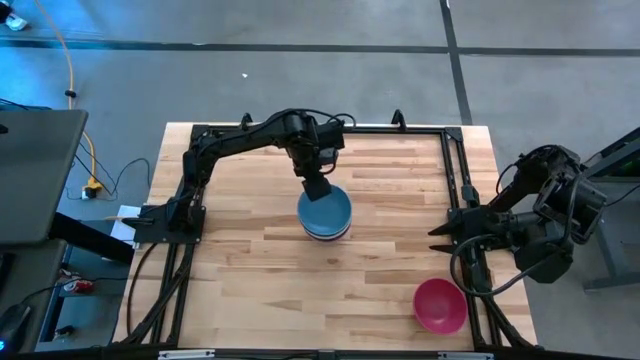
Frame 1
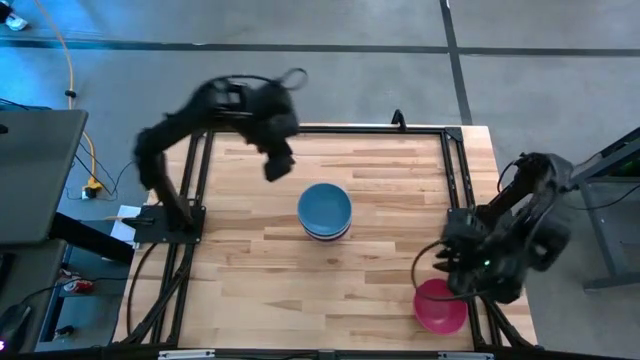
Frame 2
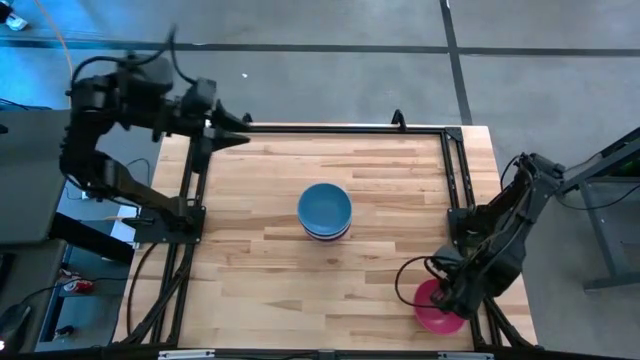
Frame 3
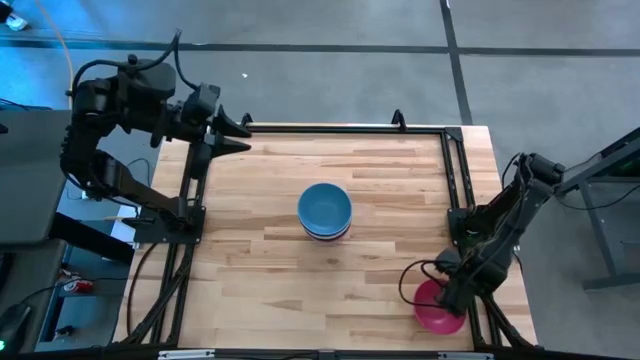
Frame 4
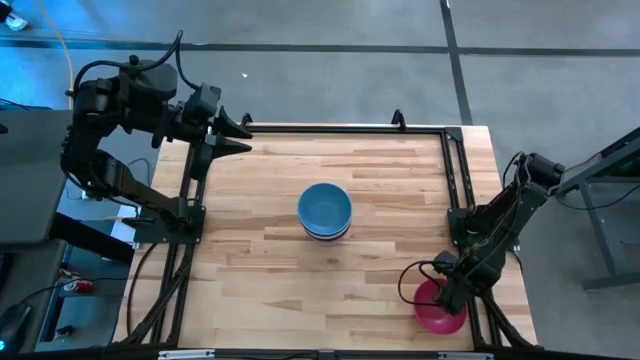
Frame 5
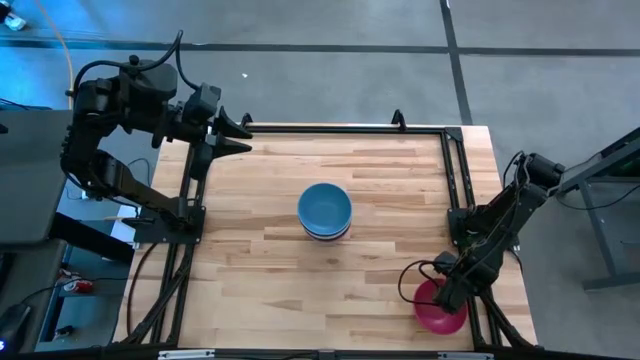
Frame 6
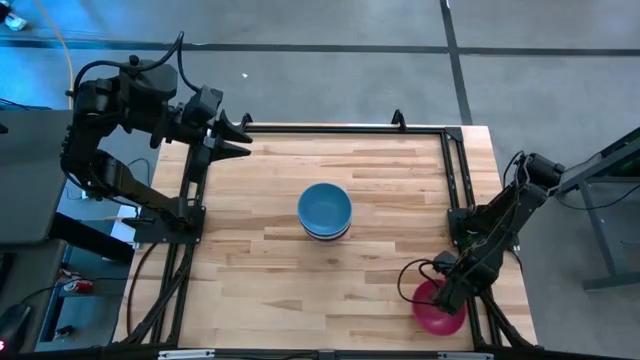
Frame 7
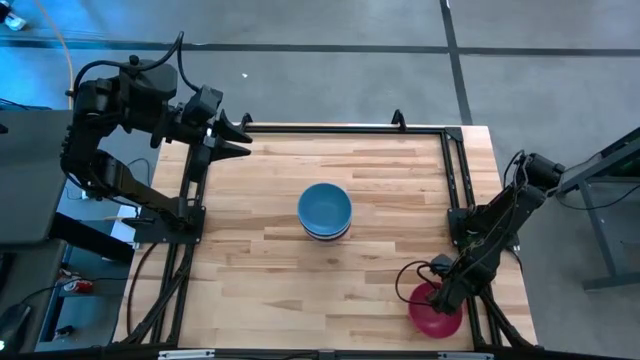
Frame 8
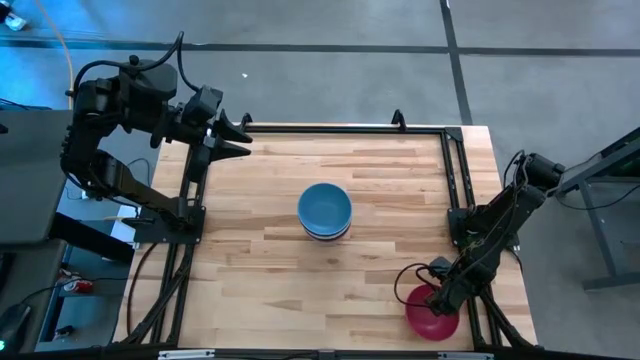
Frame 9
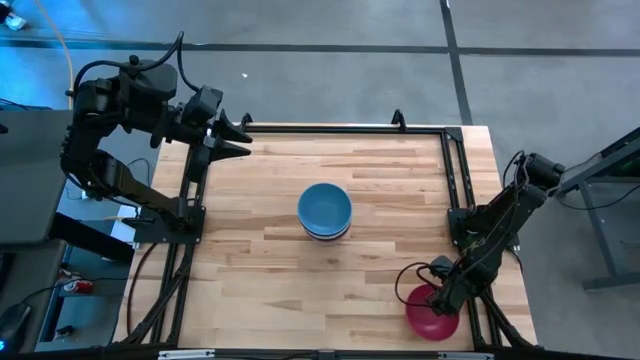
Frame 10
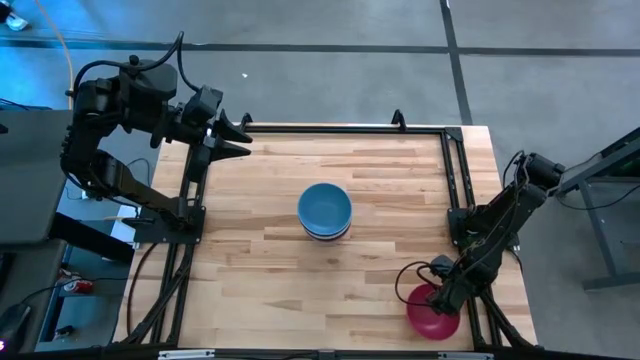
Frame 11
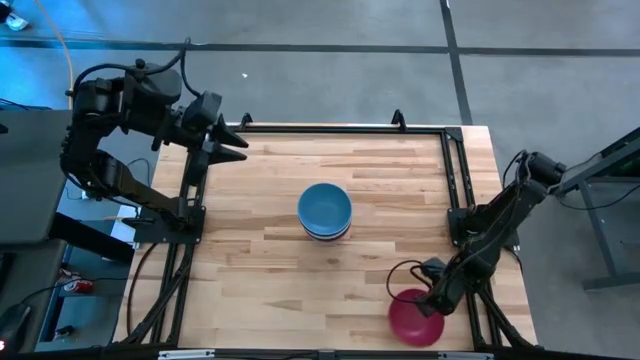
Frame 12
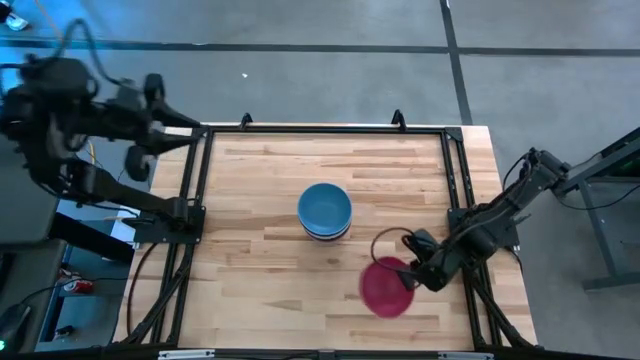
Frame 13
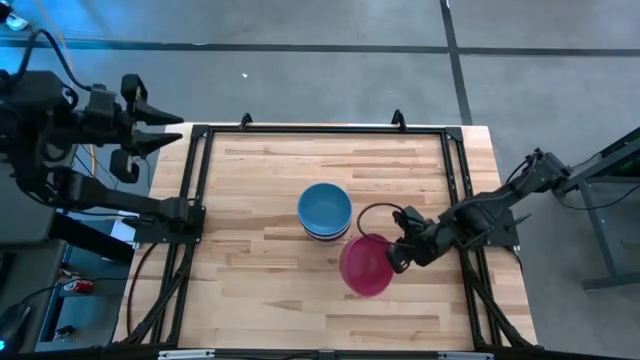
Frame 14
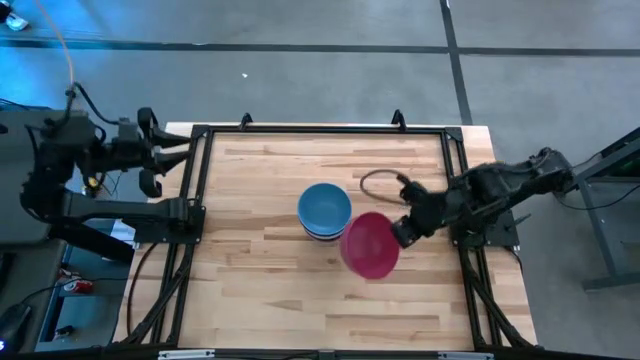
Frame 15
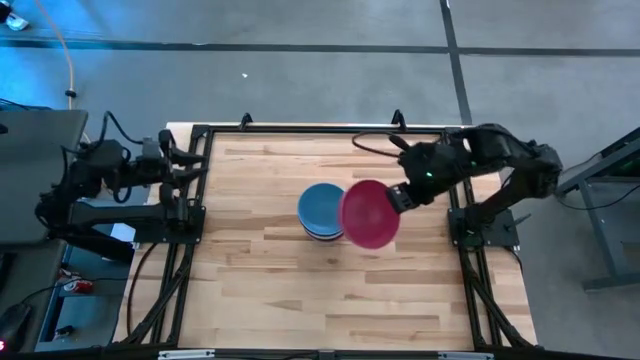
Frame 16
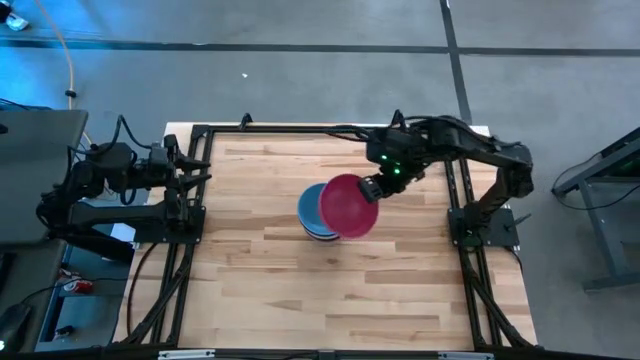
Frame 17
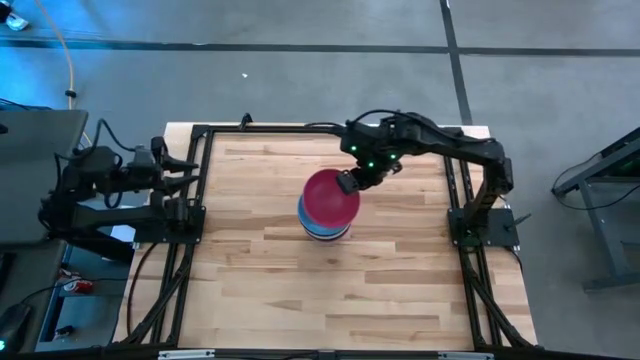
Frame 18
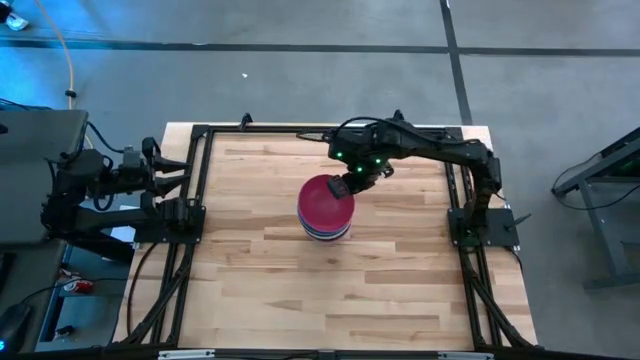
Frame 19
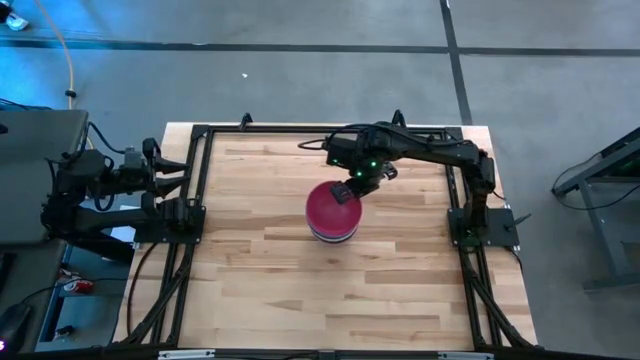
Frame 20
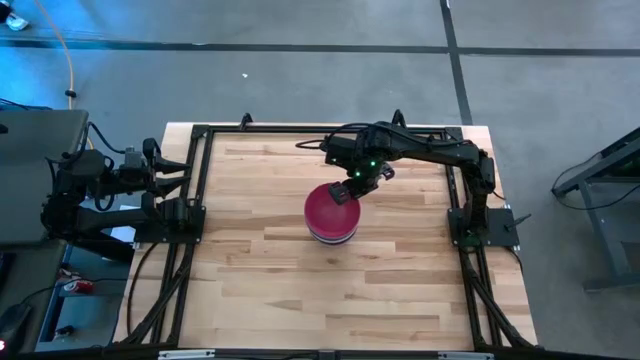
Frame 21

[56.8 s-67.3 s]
Task: Nest bowls inside each other
Stack the pink bowl on top of the blue bowl

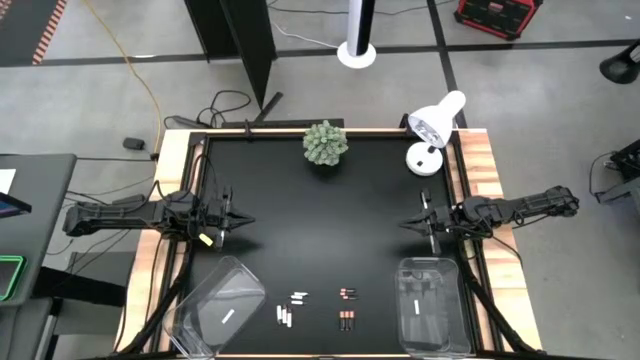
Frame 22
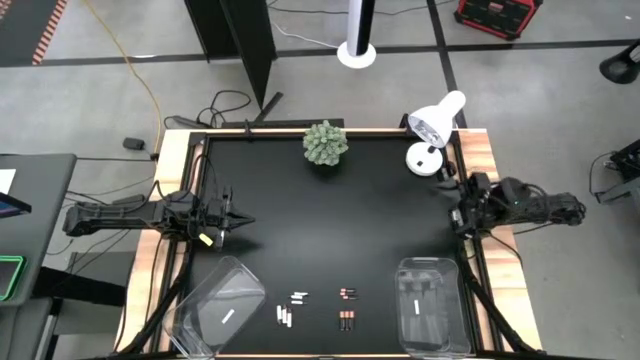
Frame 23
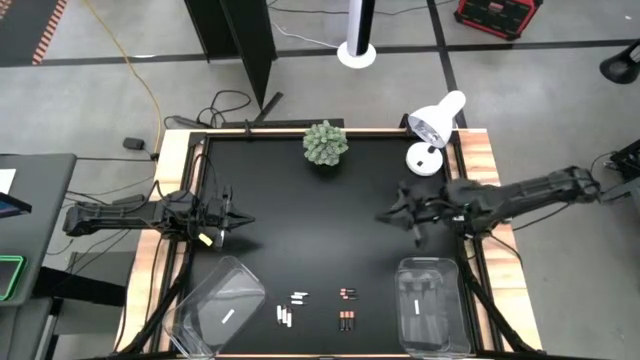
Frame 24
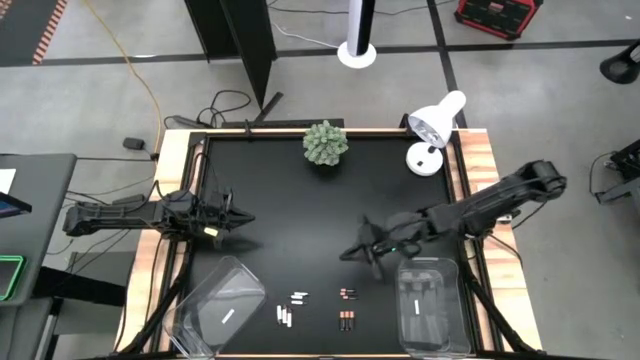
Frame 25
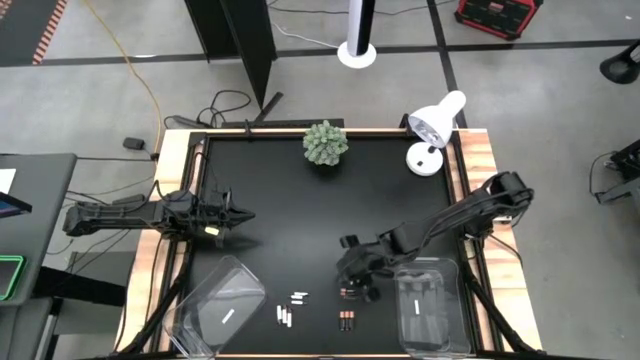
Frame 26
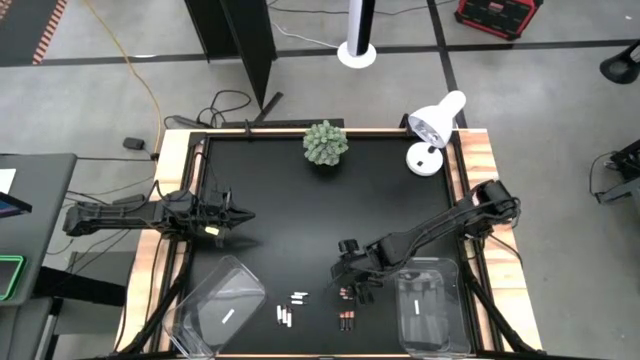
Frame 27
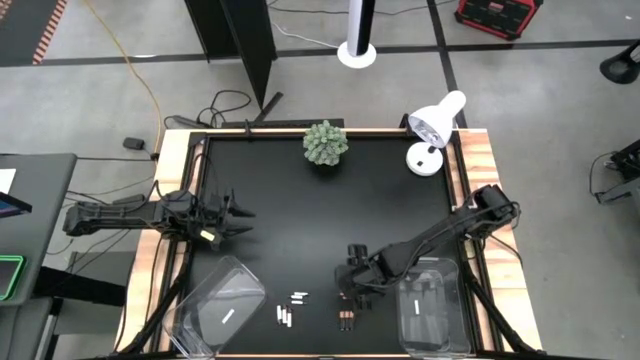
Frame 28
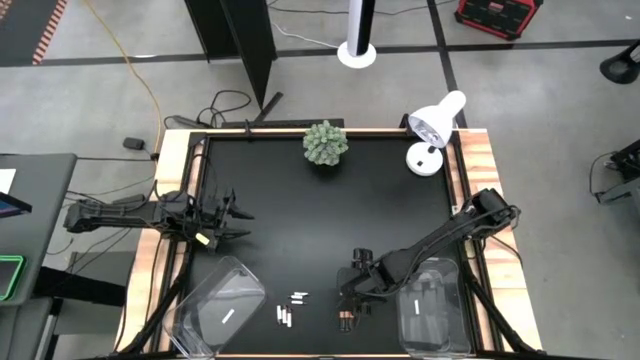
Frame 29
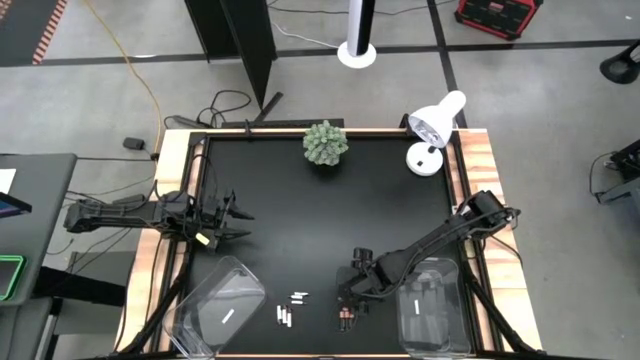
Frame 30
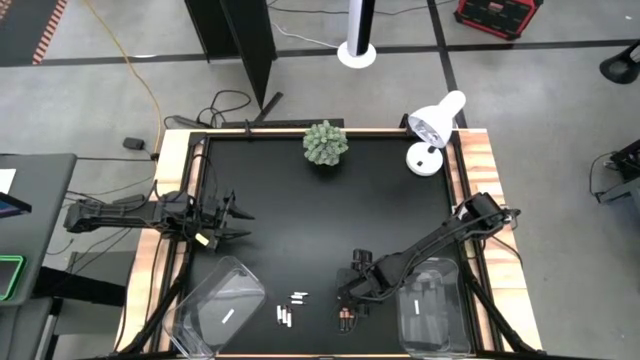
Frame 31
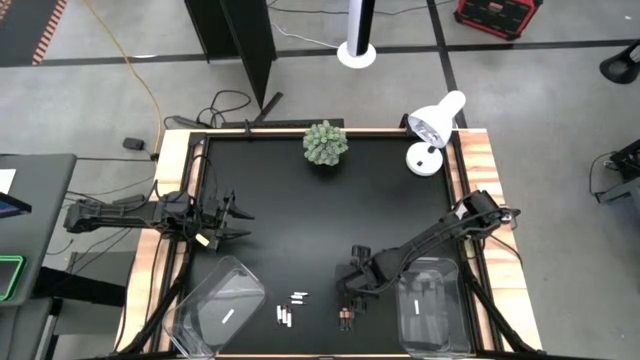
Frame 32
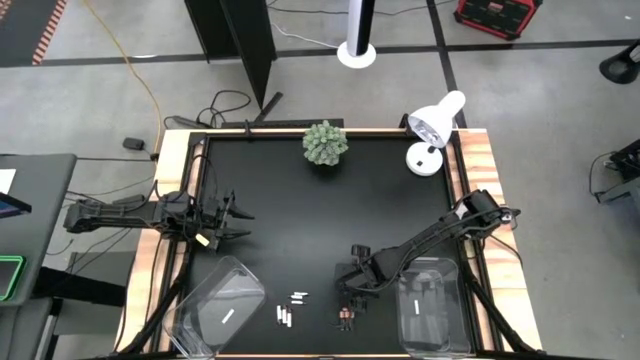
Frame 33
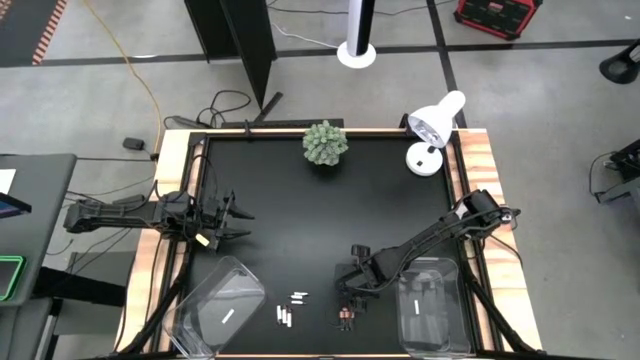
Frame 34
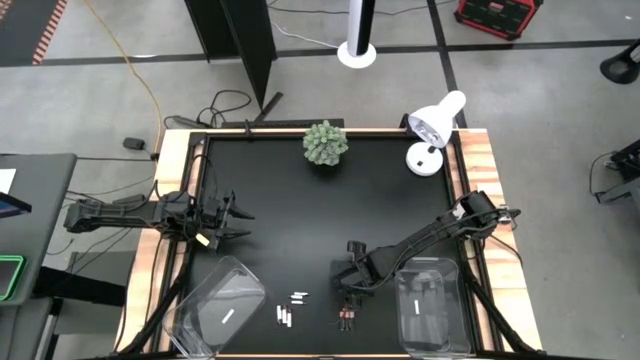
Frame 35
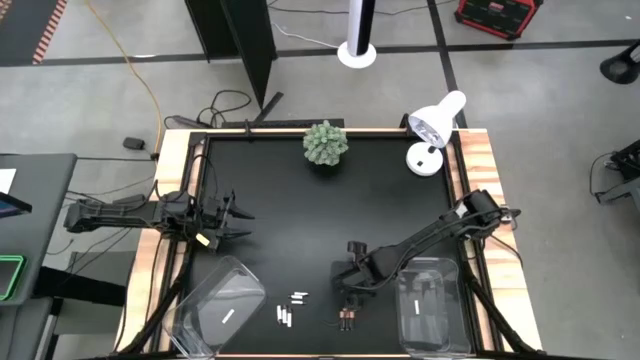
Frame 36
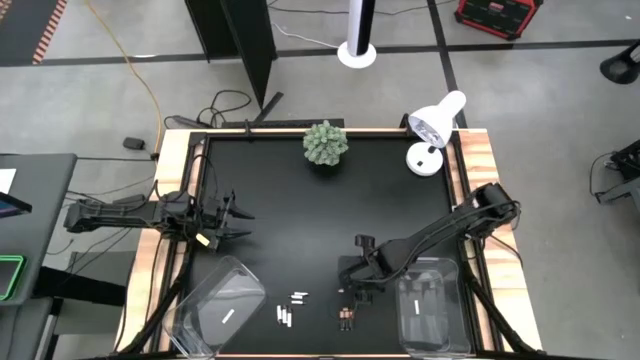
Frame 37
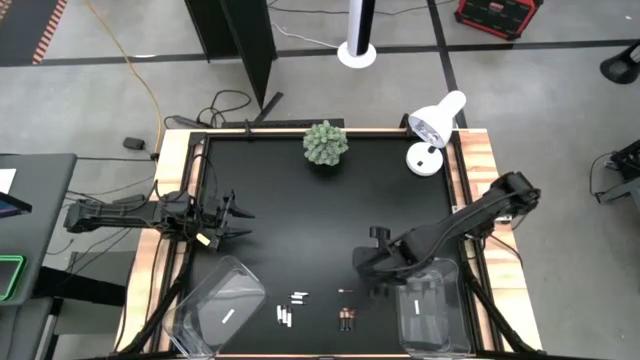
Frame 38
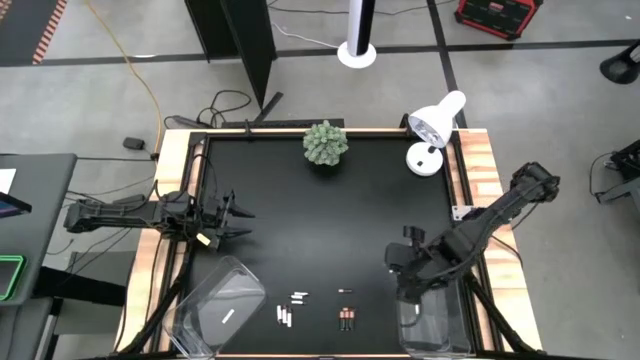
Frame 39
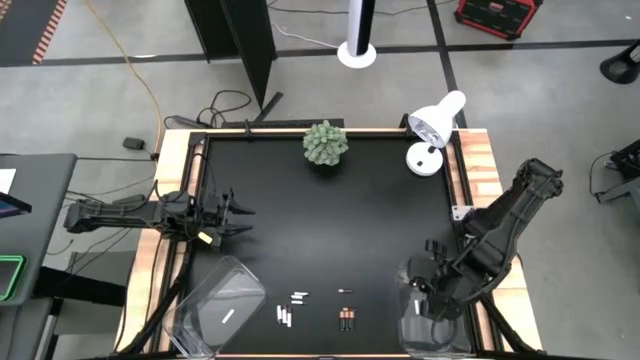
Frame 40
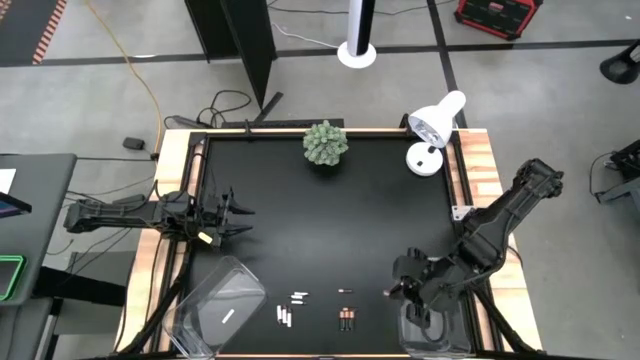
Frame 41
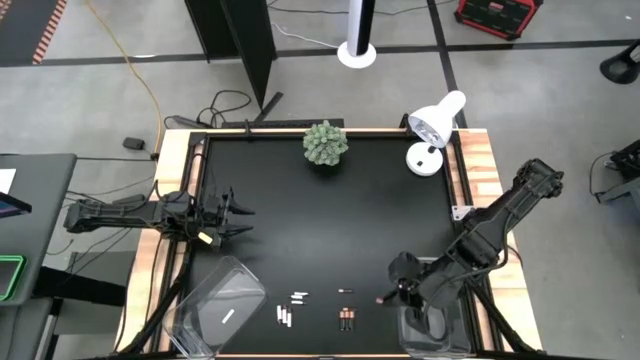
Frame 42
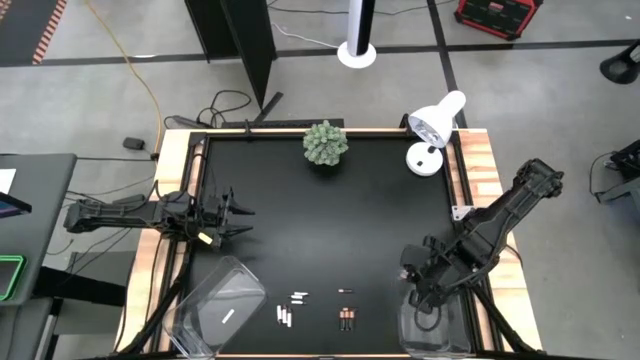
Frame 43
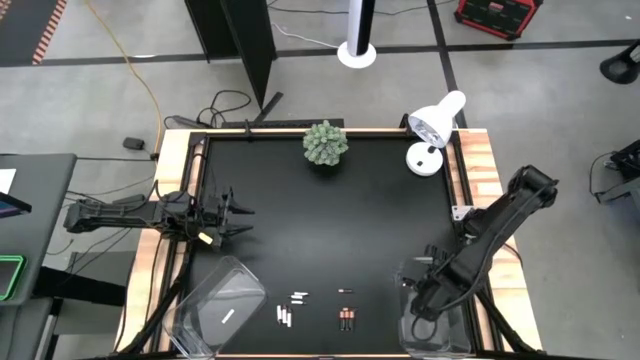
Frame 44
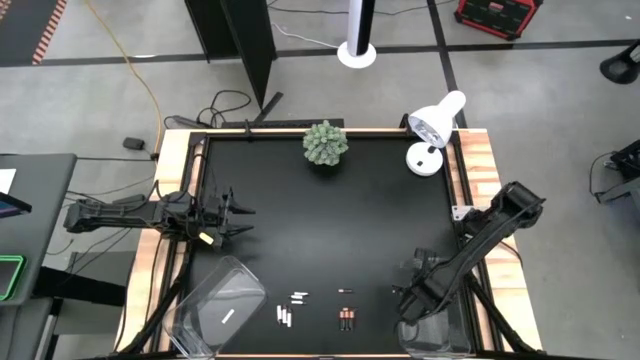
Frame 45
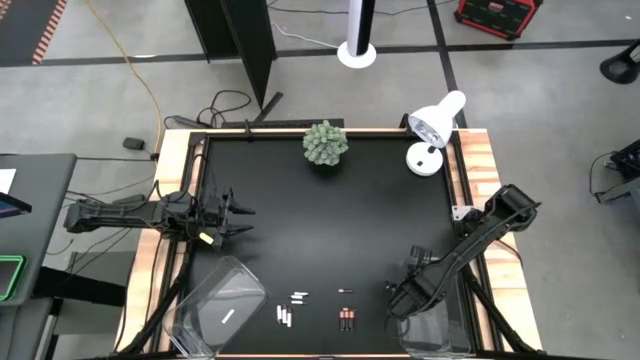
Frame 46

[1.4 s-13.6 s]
Task: Sort batteries
Put the black battery into the right transparent bin
